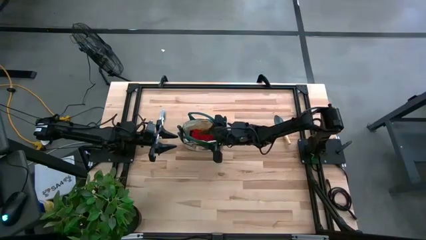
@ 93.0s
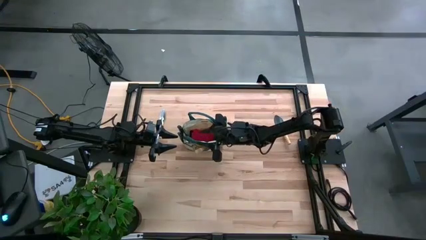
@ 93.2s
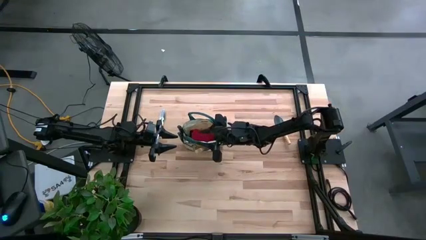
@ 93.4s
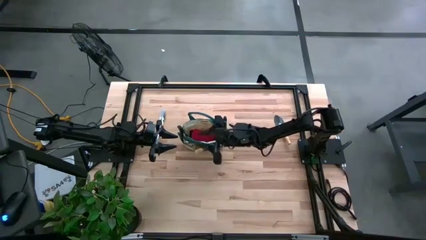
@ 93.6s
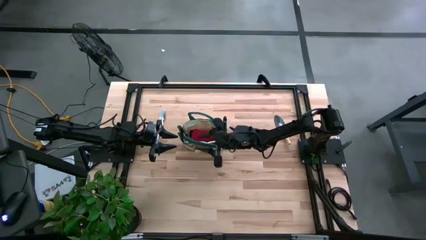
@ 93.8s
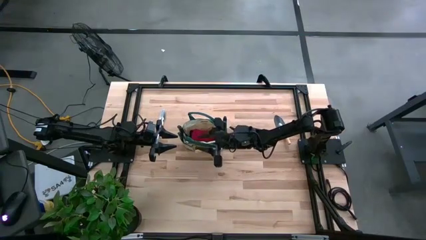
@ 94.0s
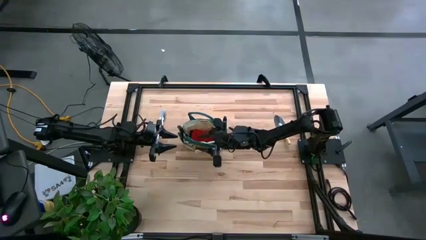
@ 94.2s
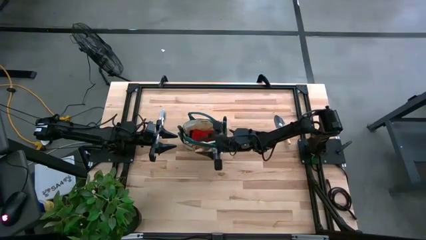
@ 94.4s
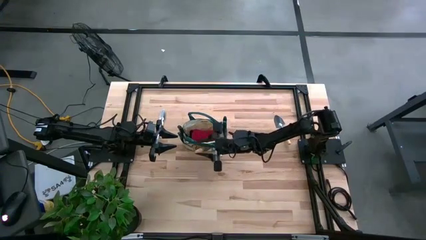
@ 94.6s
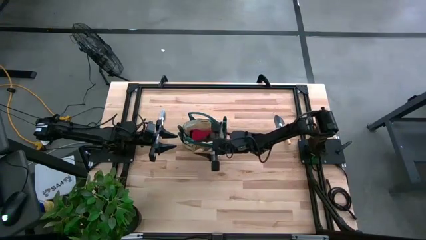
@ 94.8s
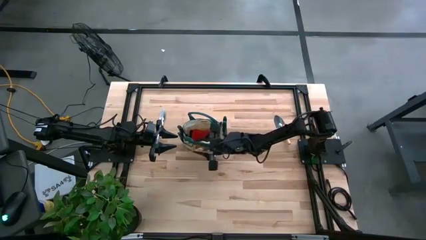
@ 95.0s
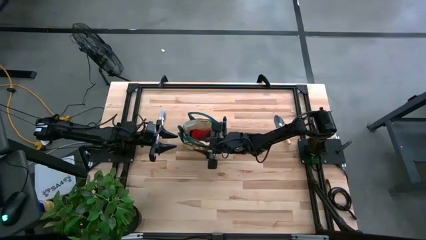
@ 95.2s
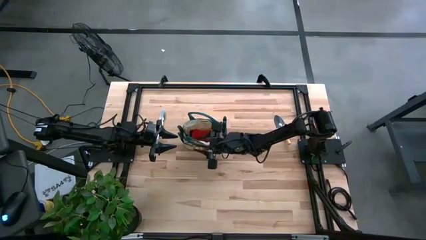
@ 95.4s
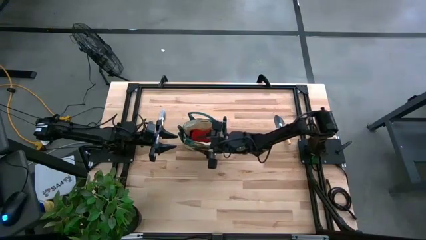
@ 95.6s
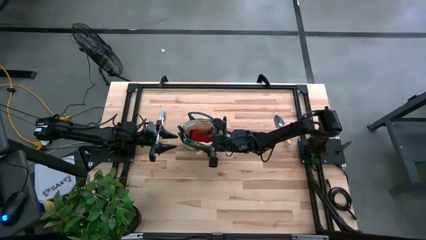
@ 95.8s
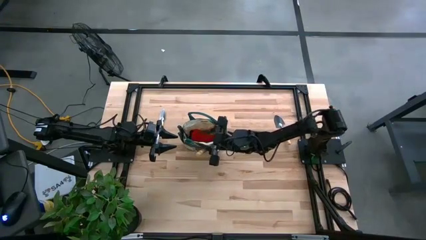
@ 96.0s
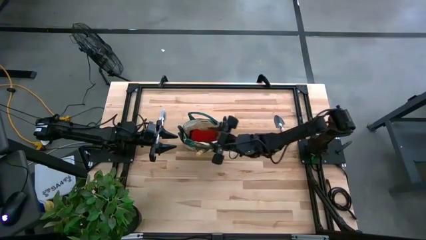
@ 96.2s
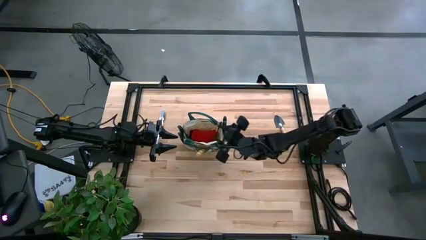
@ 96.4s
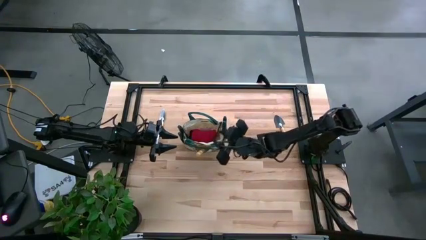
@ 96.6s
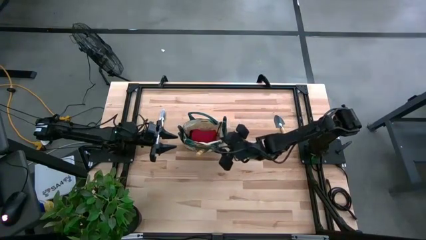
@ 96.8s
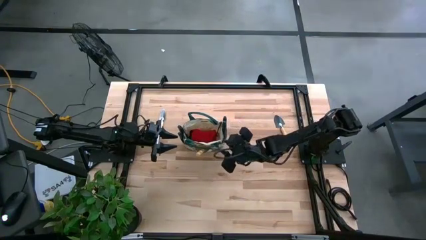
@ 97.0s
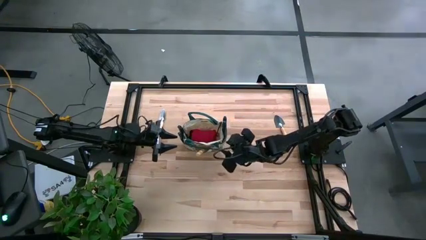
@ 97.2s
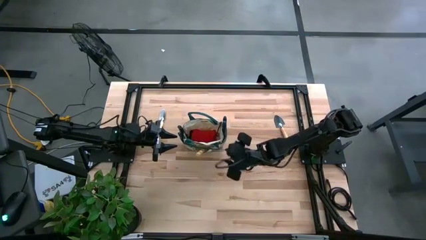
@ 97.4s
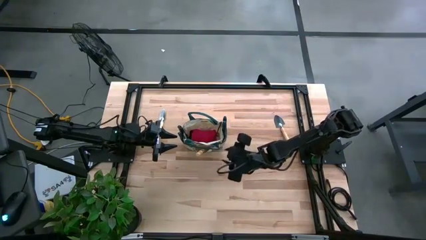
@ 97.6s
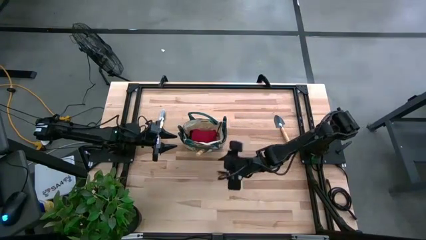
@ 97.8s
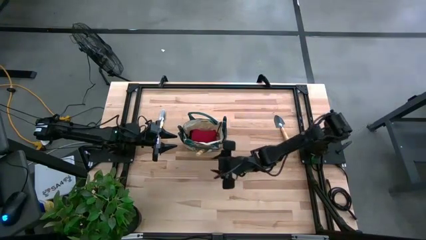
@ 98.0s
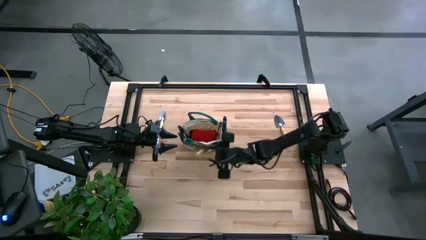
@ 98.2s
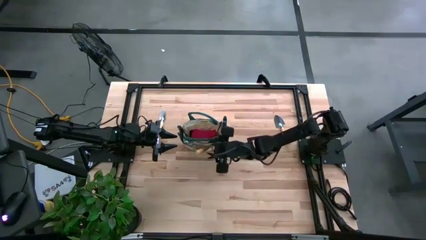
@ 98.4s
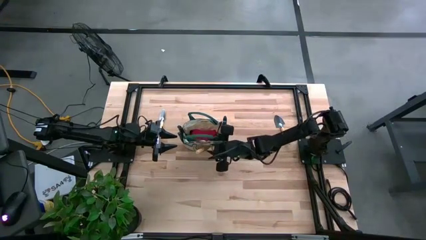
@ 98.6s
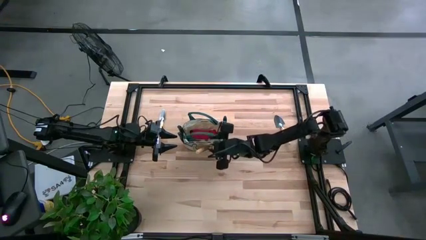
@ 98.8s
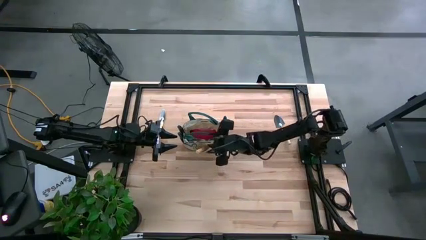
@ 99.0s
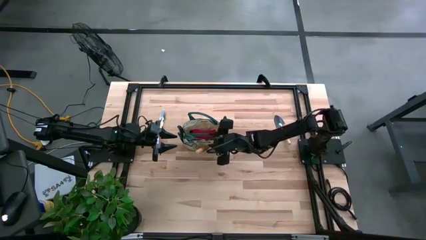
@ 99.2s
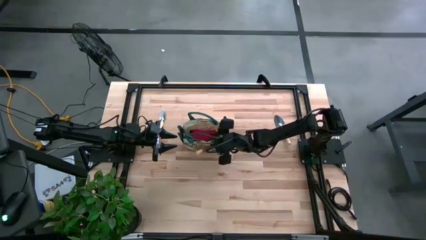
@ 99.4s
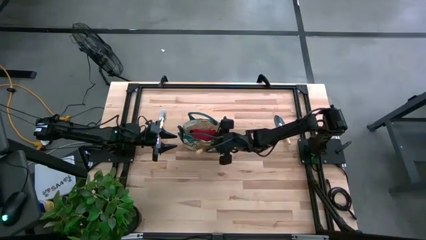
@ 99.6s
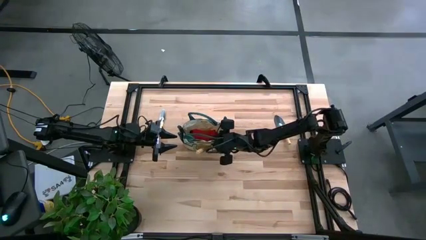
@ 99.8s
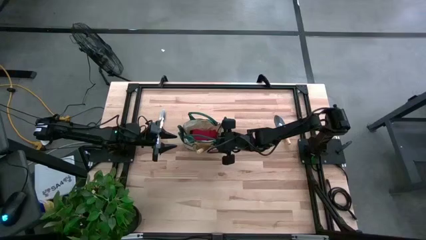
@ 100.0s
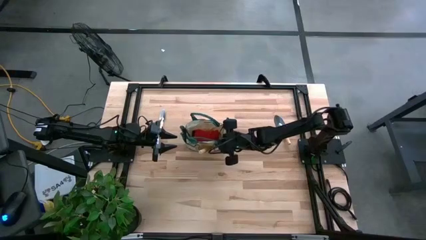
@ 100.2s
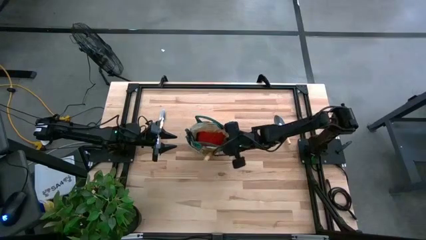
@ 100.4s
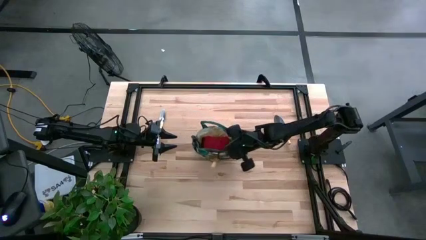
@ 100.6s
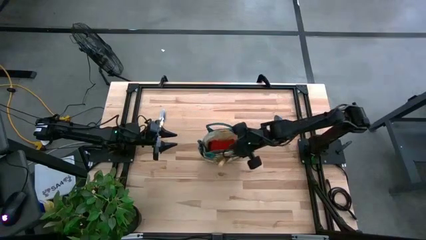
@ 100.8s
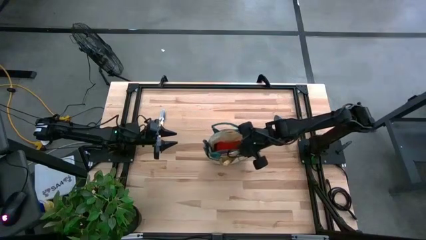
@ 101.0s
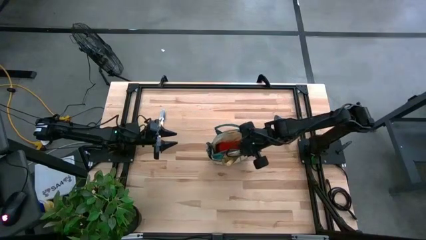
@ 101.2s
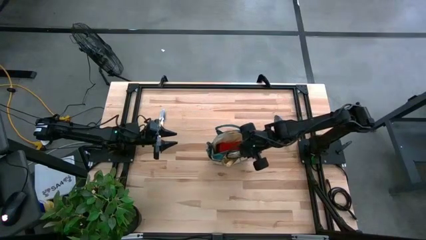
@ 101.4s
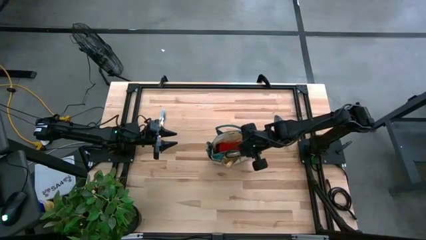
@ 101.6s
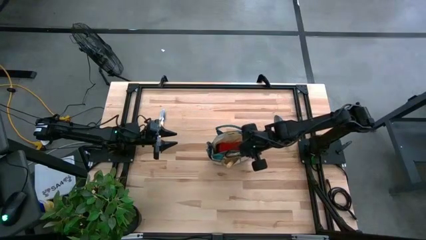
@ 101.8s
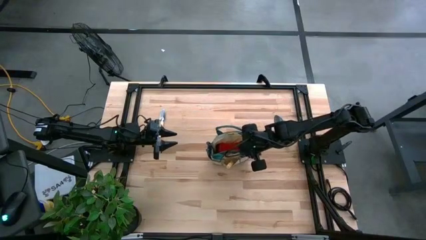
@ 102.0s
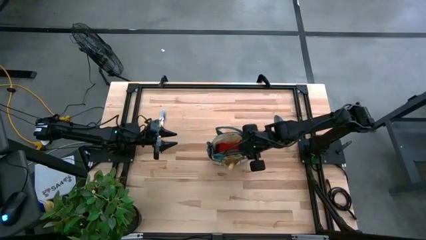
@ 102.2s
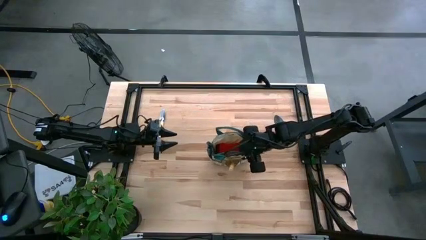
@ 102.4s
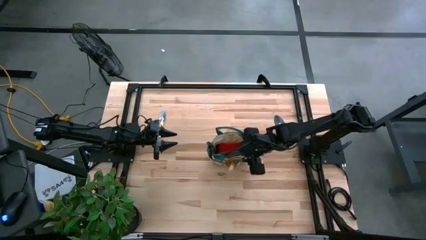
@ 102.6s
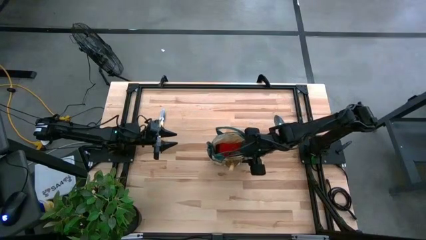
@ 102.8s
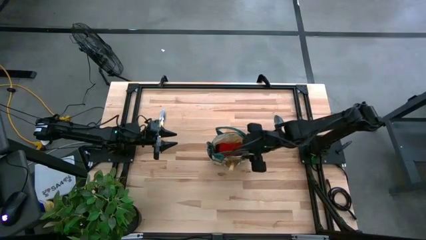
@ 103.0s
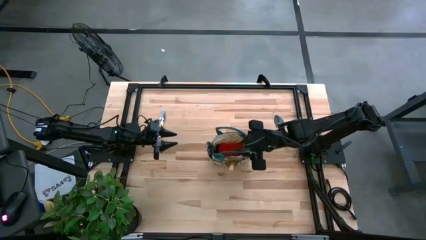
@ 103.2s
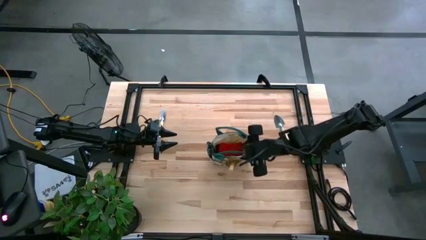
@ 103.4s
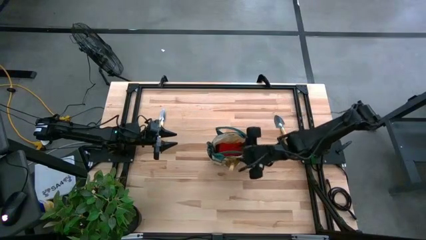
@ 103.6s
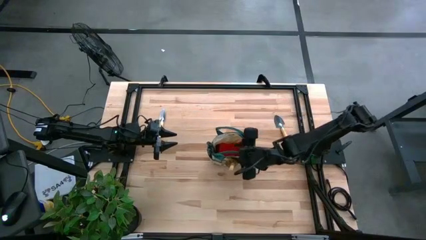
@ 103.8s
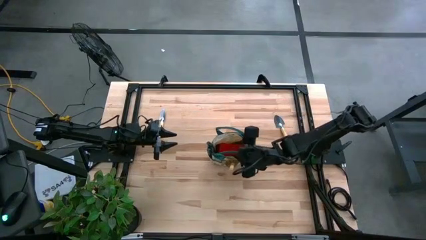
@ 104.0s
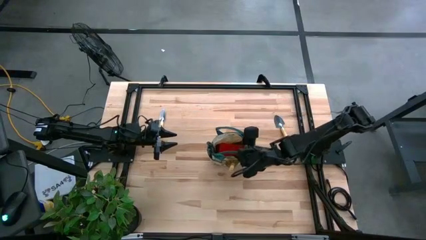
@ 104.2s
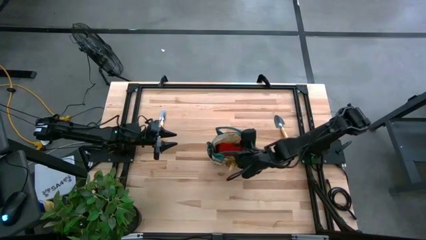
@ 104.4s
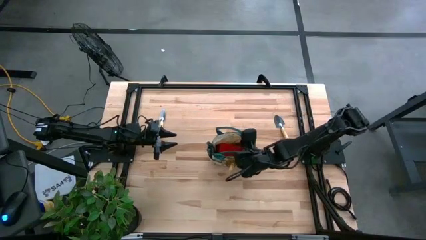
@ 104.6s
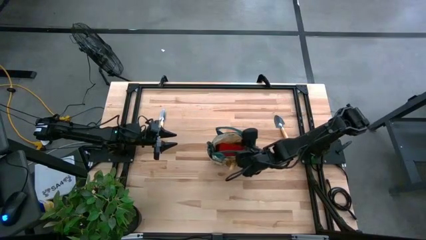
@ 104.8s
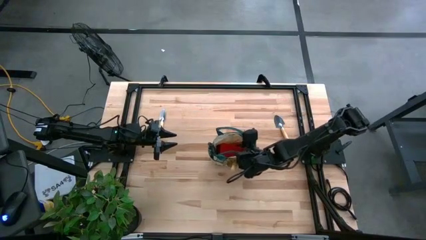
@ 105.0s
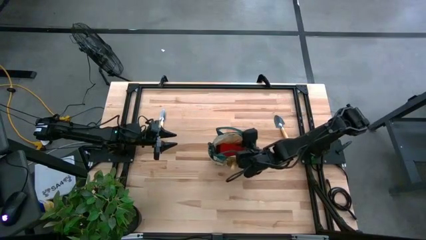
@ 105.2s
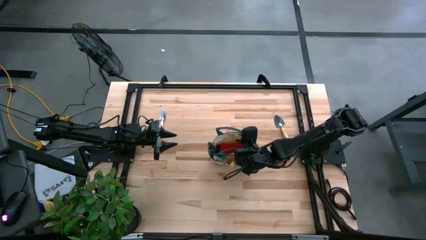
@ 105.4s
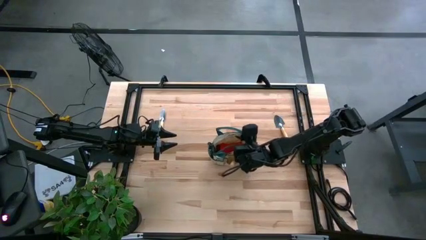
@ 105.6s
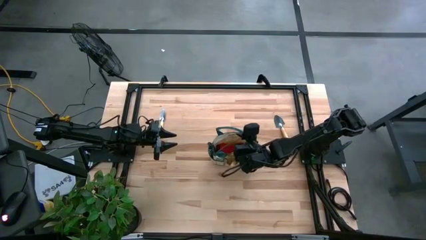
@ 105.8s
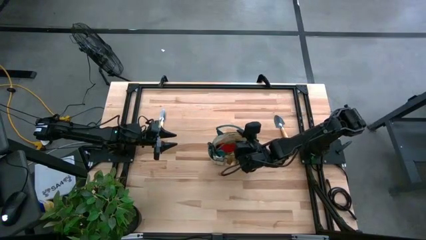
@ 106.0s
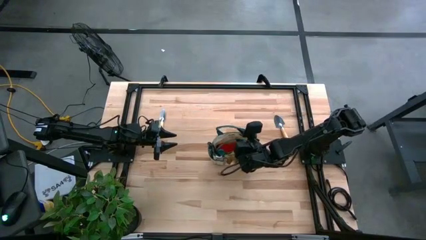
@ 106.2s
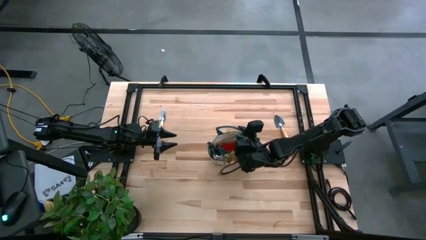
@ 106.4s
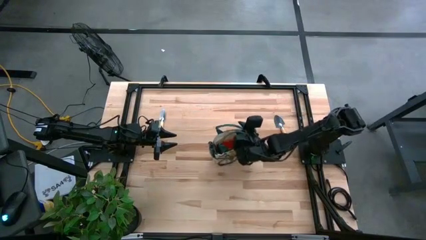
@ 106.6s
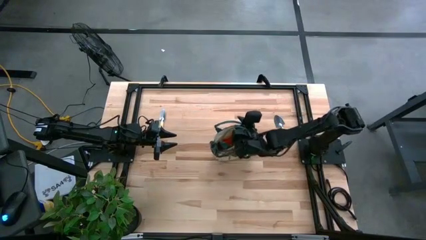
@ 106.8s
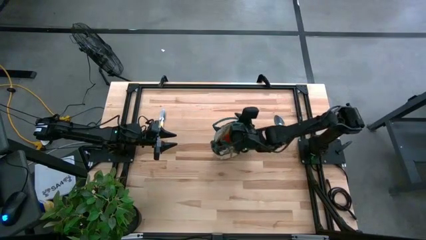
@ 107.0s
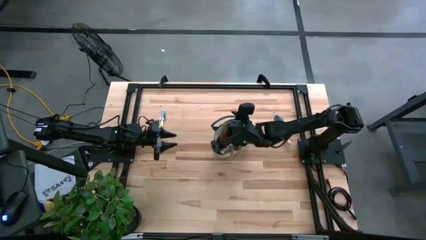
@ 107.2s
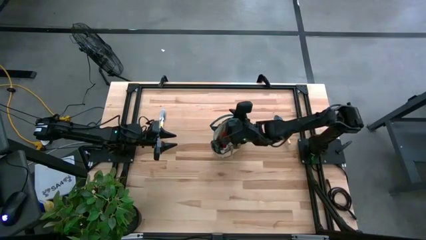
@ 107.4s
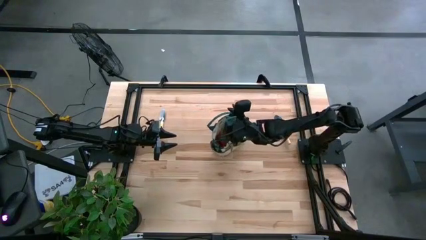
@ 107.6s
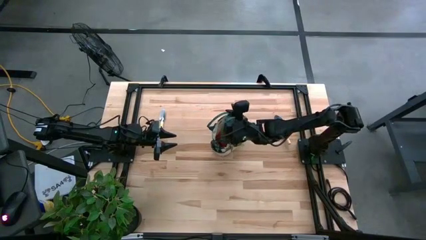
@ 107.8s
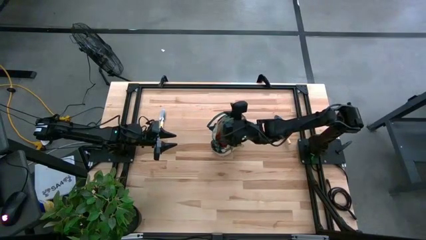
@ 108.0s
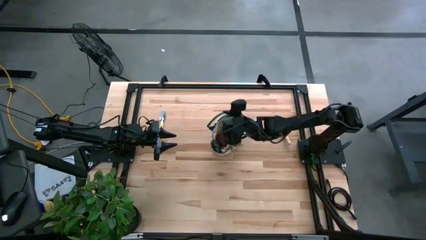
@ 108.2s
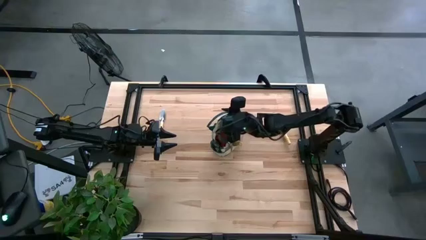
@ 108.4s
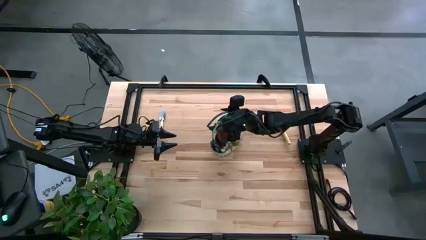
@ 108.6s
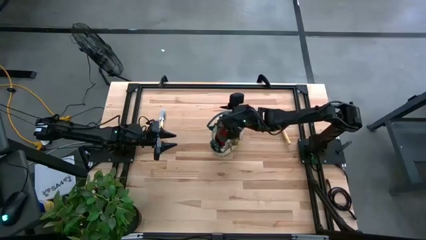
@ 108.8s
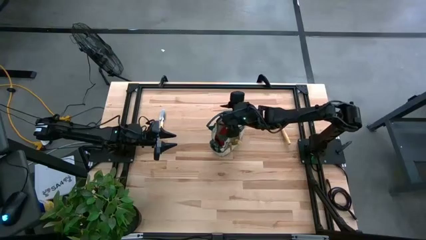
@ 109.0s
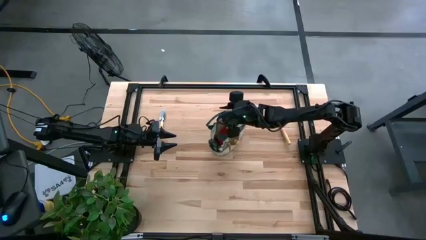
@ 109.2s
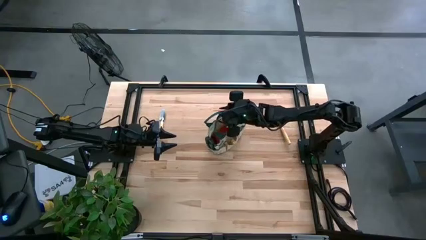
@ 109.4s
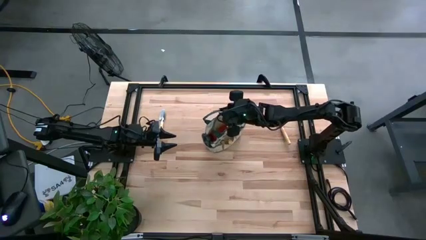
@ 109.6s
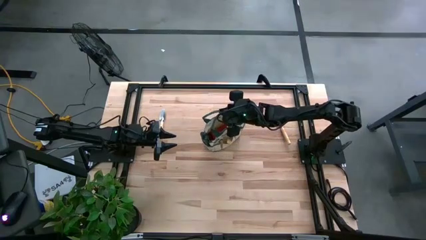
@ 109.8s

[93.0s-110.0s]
Task: Pick & Place Garden tools in Gardening bag
Adjust the light brown gardening bag
